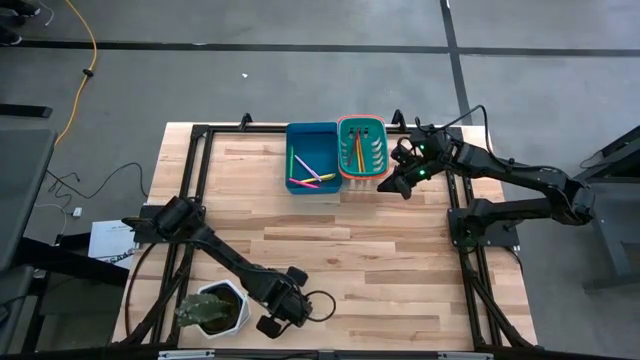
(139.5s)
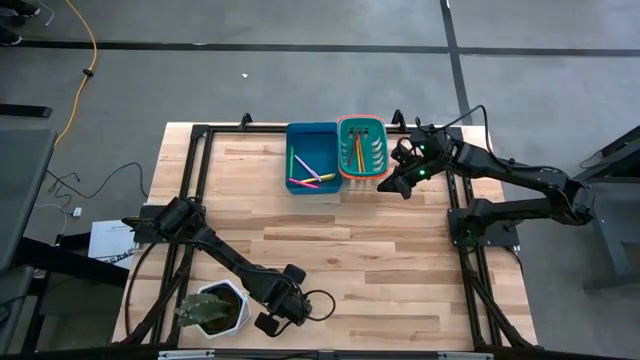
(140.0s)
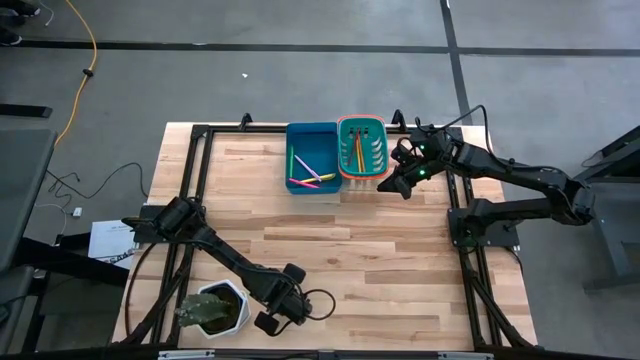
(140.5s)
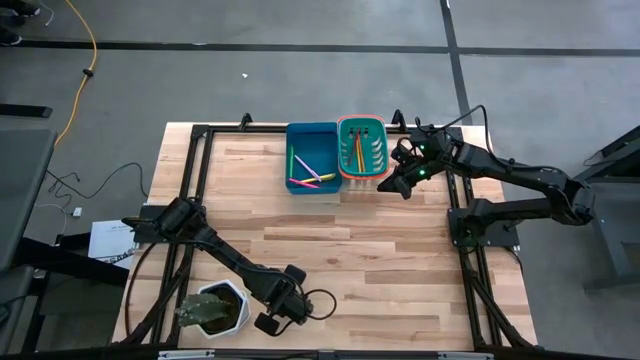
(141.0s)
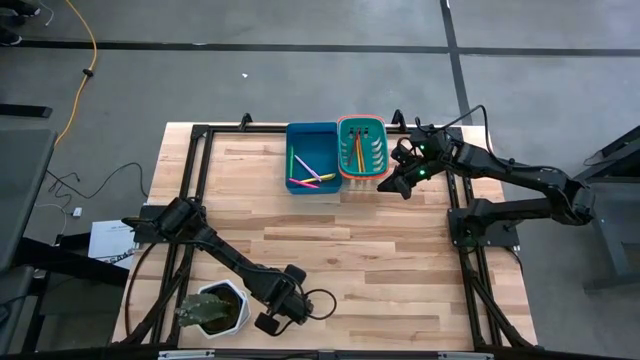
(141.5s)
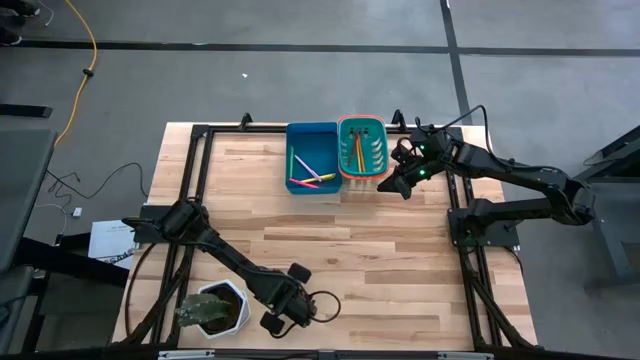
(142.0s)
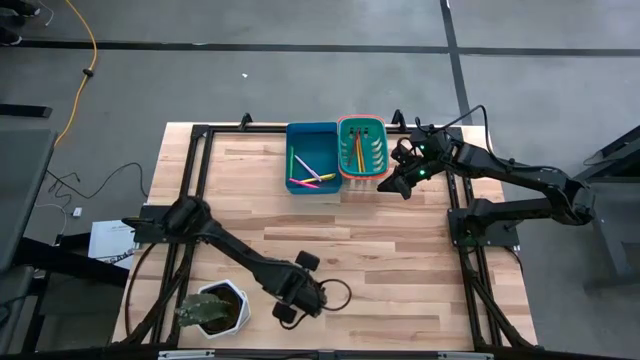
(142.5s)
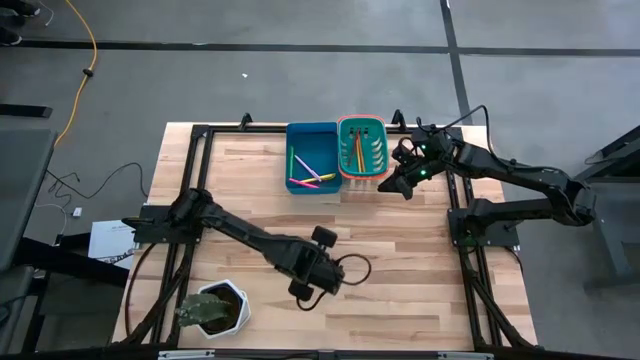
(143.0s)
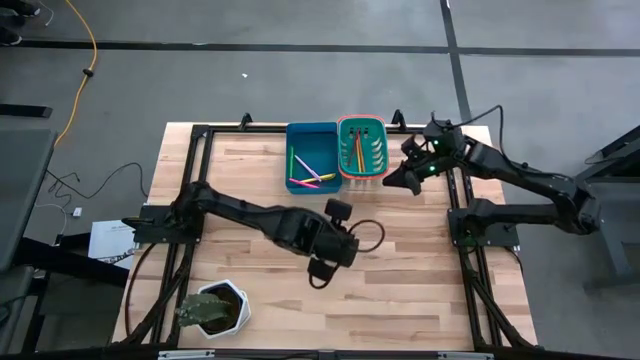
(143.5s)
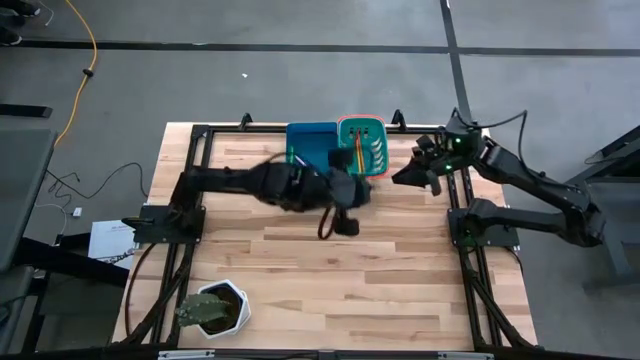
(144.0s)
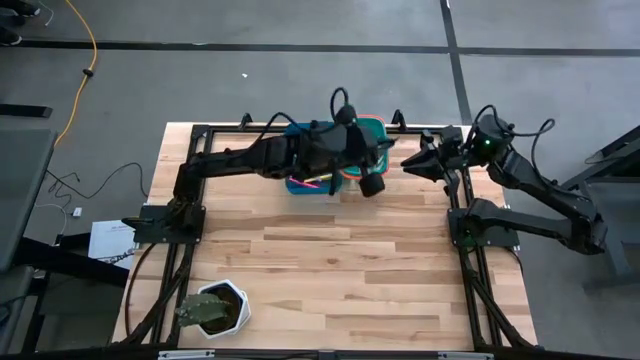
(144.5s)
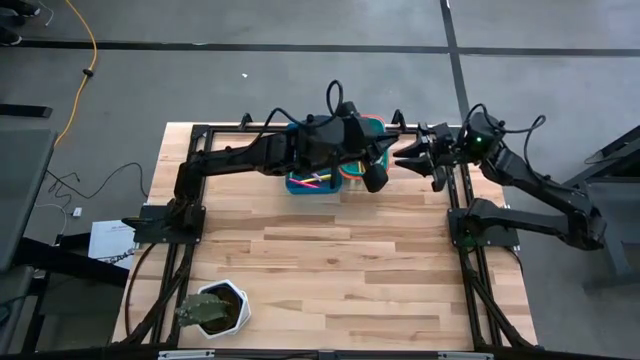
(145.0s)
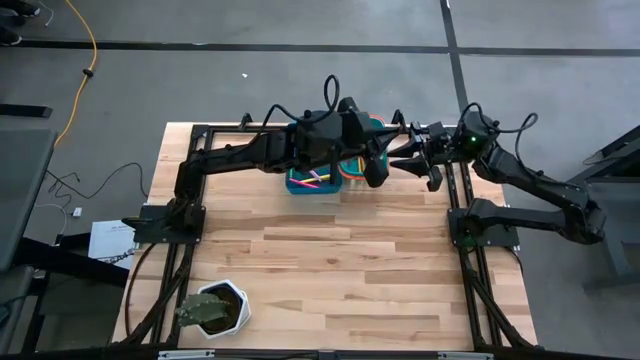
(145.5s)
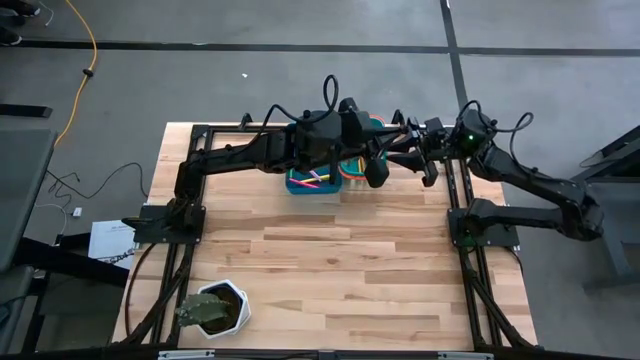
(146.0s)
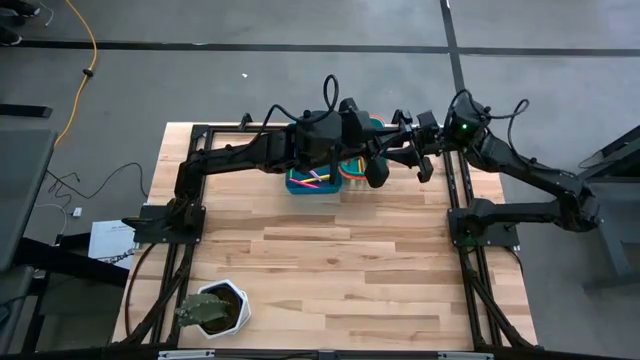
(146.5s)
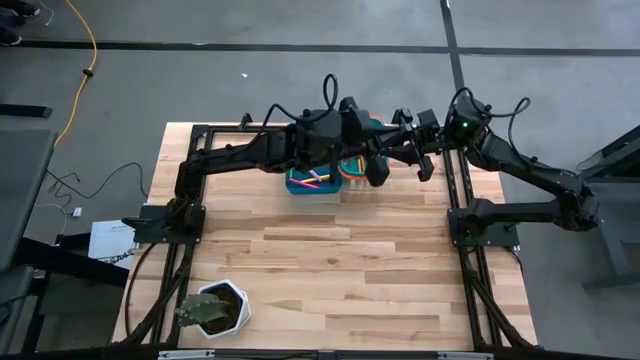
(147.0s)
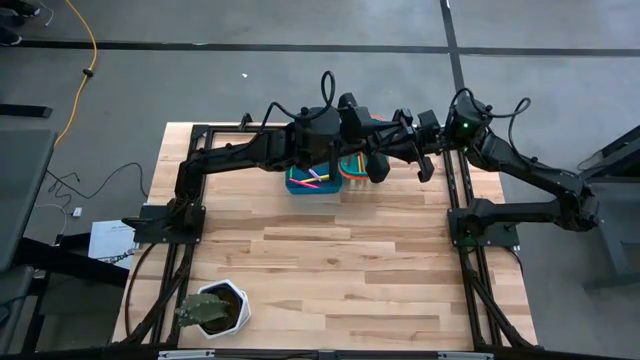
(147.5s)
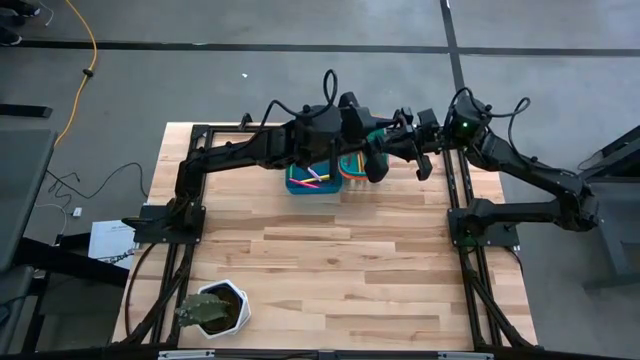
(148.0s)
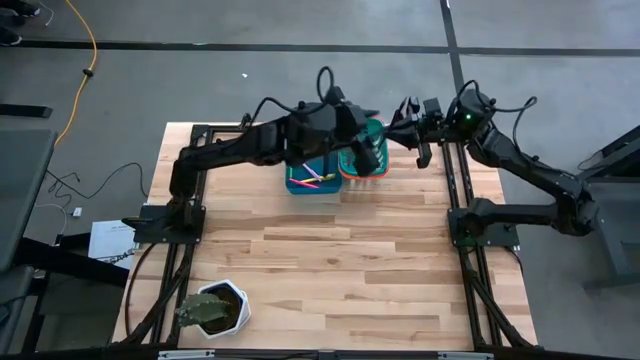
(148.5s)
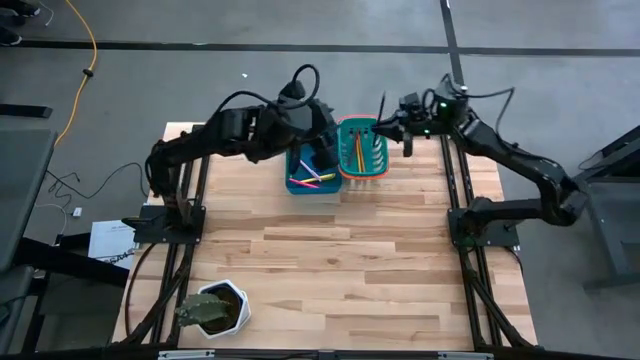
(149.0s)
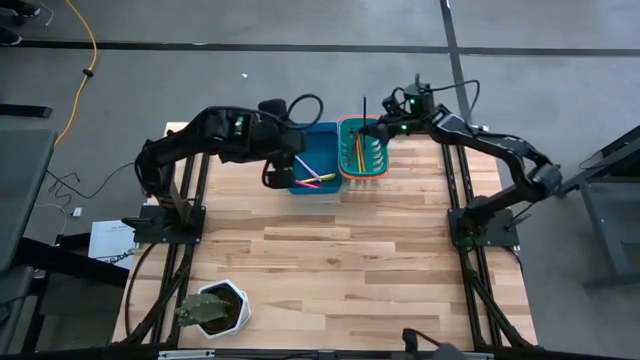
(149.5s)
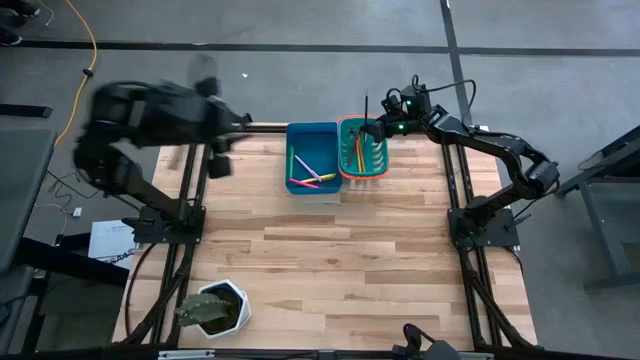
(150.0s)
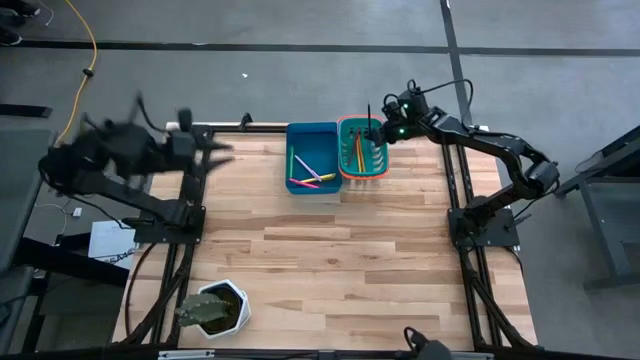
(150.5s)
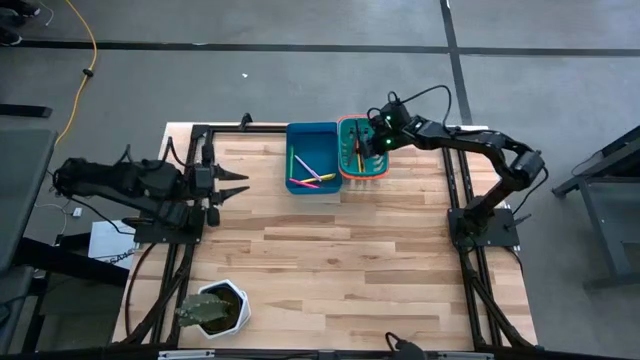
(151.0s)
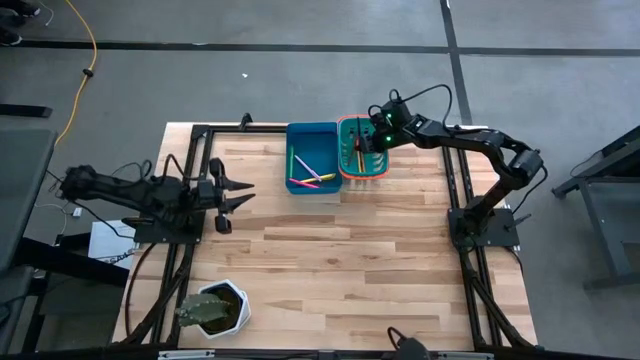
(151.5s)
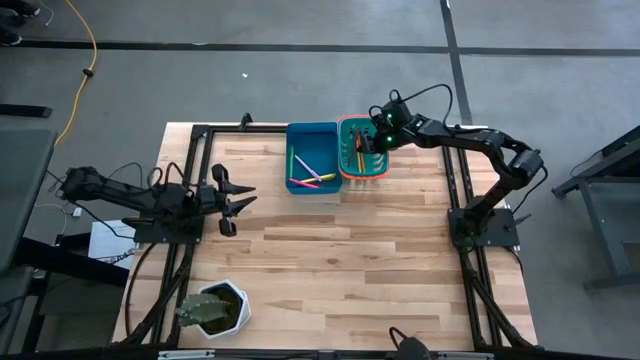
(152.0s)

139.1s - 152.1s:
Task: Sort pens & pencils
Put the blue pencil into the green bin

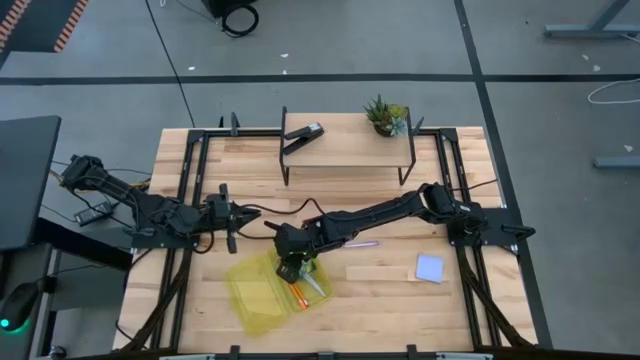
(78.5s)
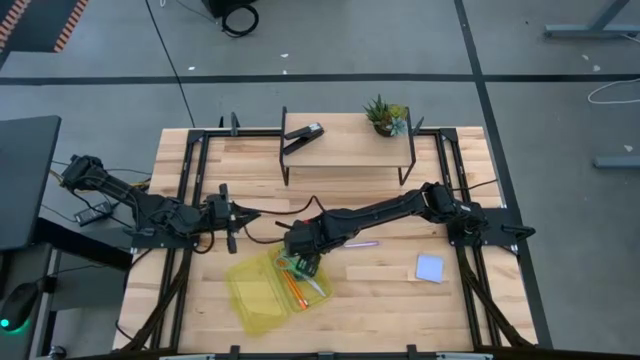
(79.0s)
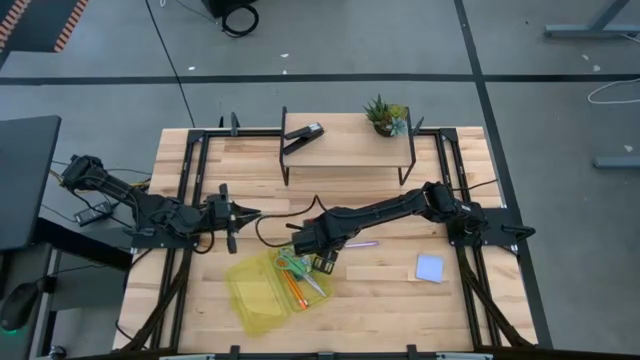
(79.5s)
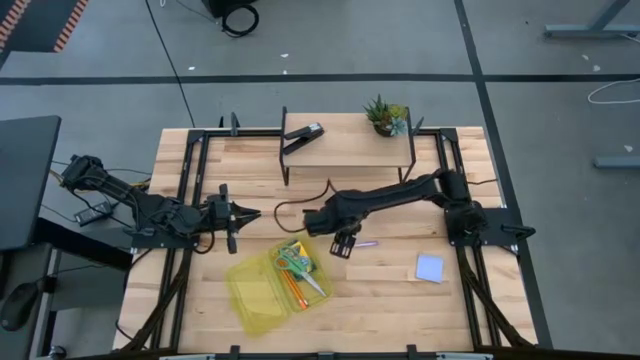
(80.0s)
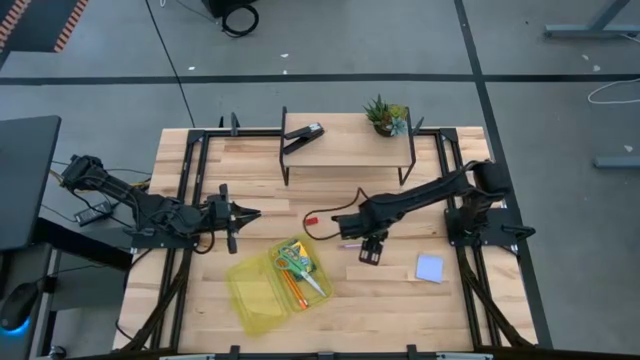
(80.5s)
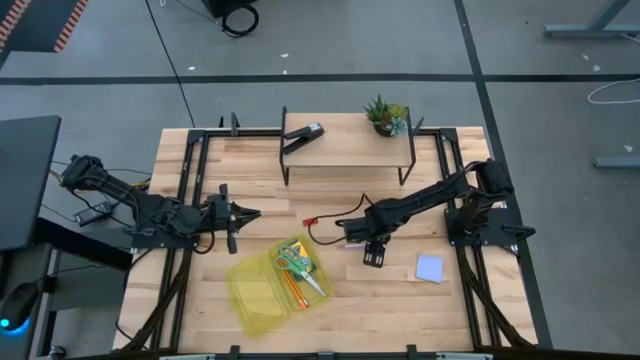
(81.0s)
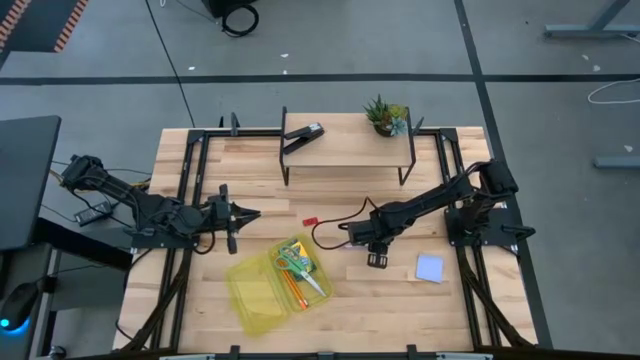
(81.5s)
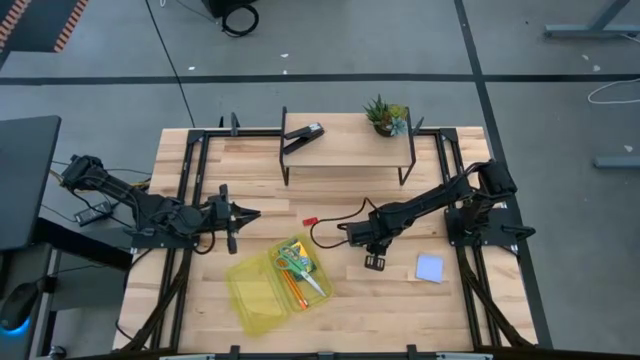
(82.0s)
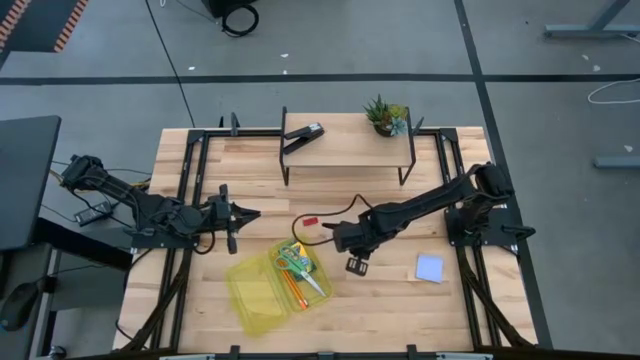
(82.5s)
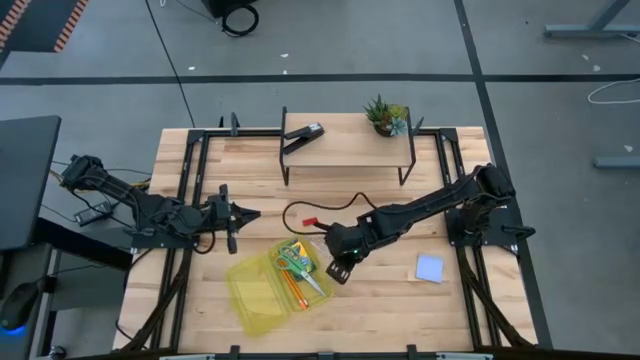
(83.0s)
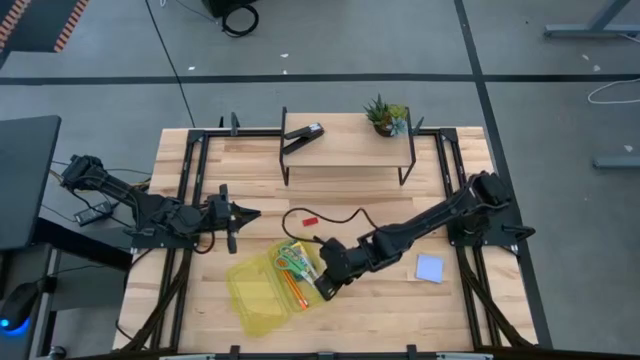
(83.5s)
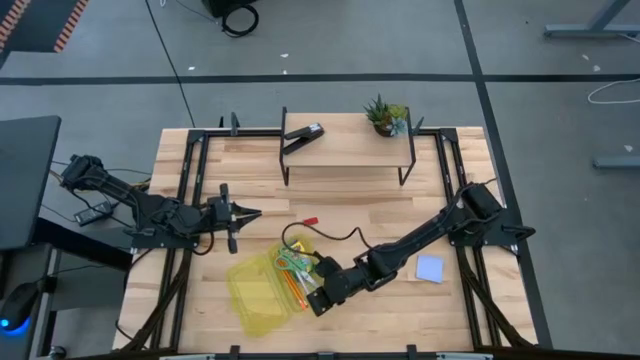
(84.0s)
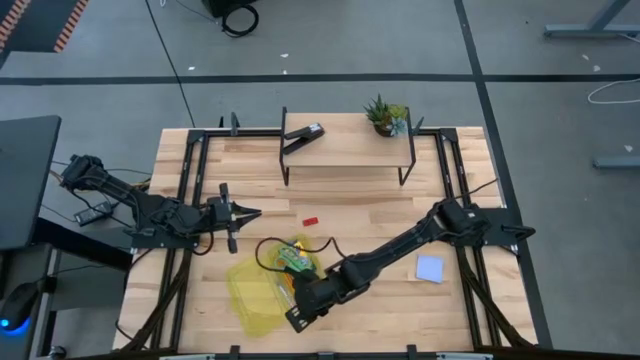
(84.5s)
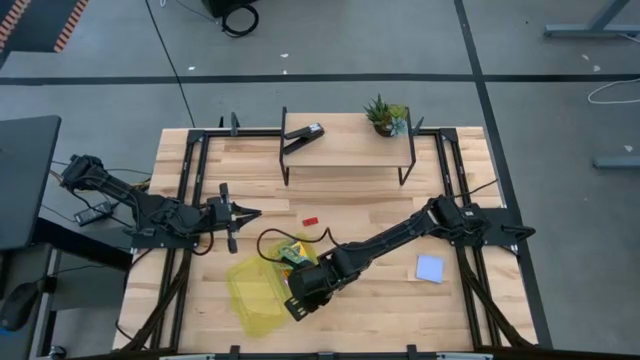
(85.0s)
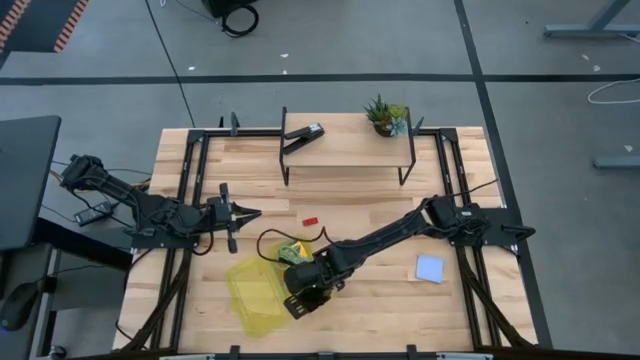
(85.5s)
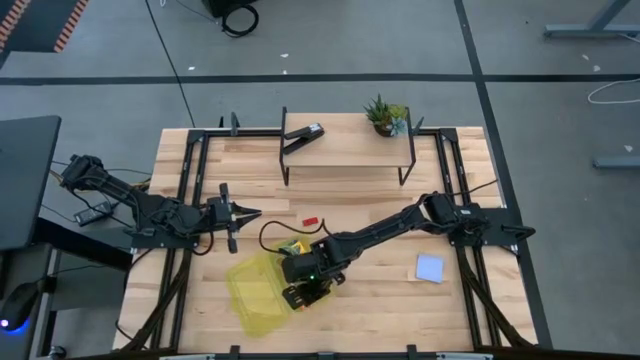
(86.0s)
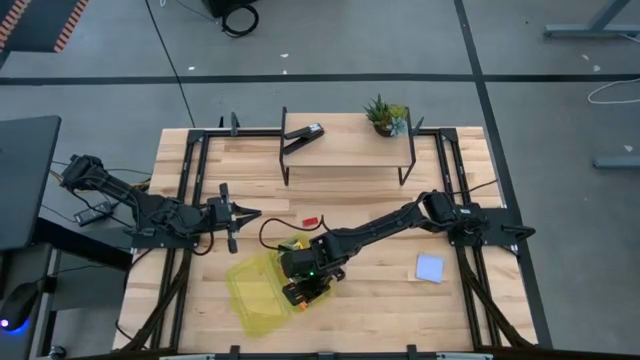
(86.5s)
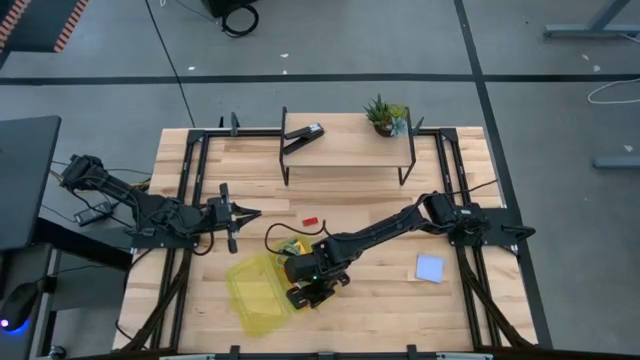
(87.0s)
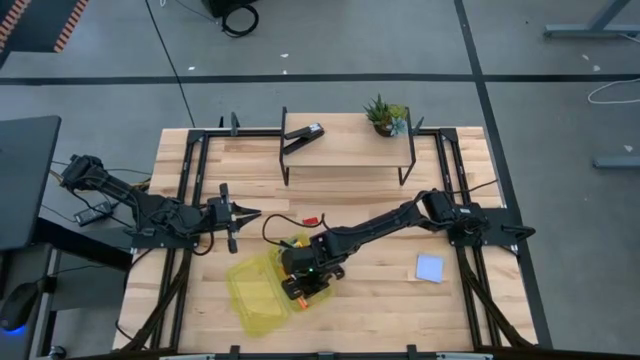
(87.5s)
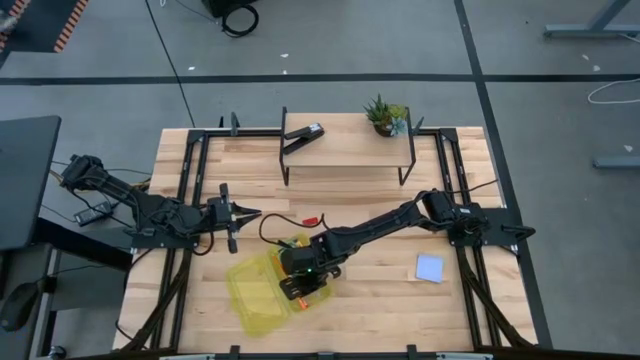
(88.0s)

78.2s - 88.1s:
Task: Pack school essentials
Put the purple mechanical pencil into the supply box
